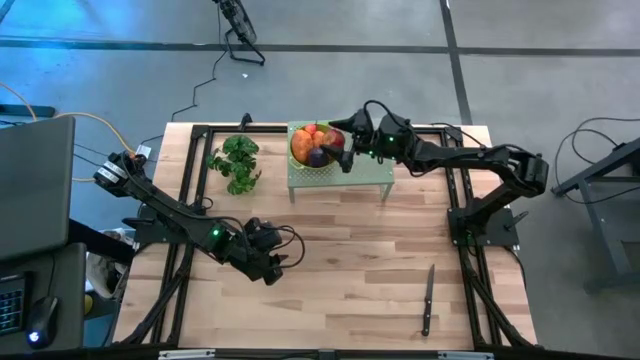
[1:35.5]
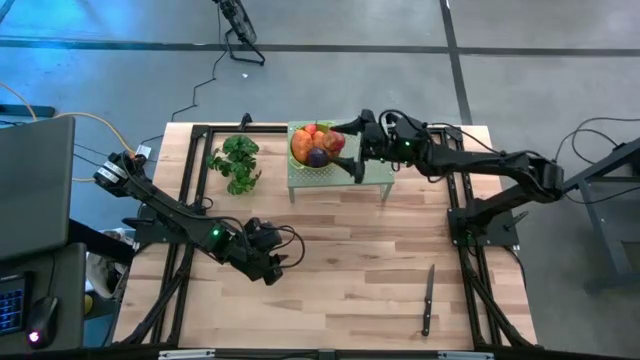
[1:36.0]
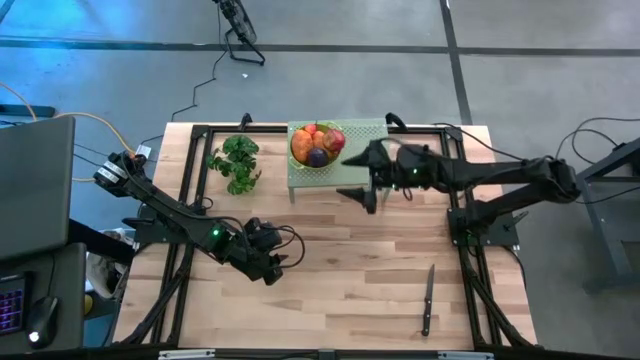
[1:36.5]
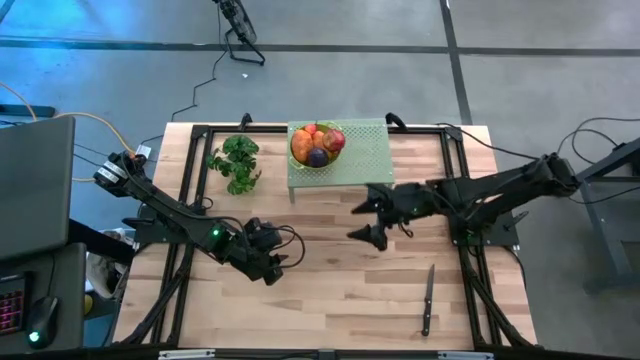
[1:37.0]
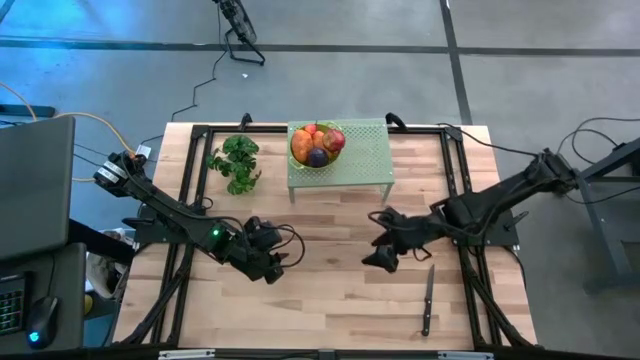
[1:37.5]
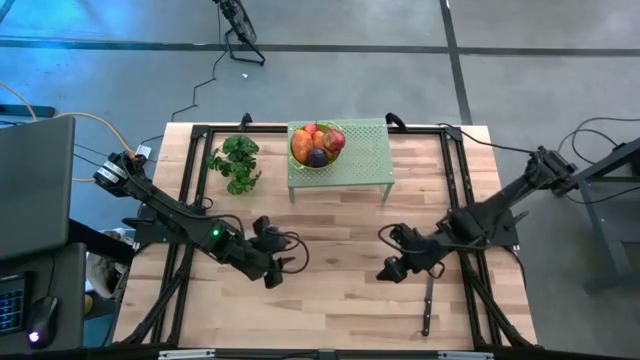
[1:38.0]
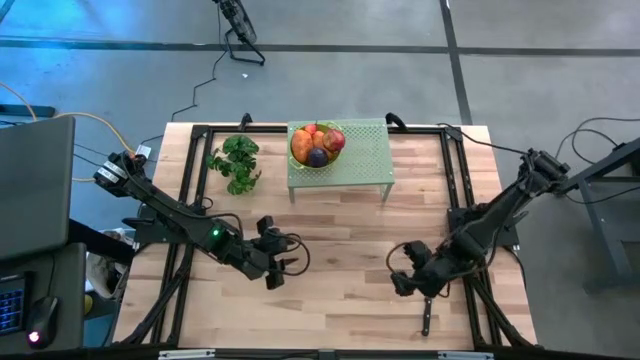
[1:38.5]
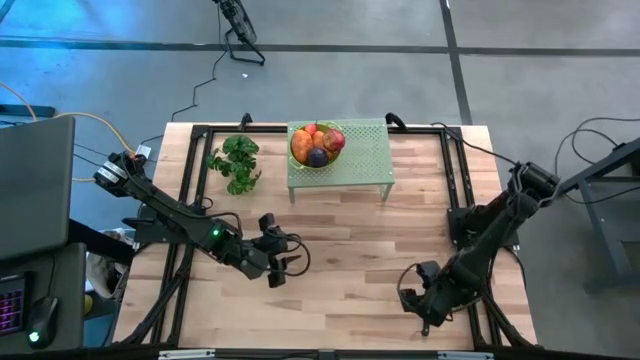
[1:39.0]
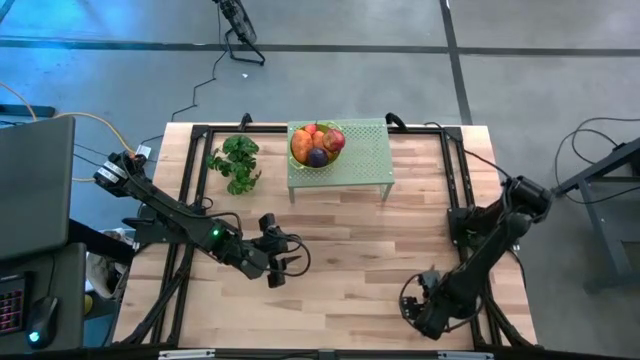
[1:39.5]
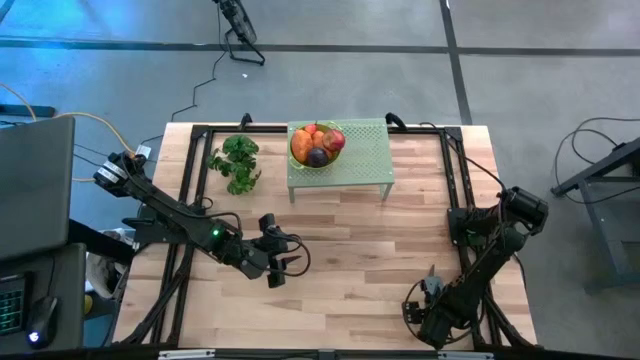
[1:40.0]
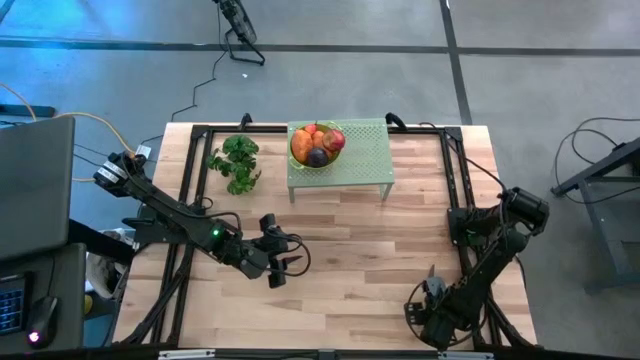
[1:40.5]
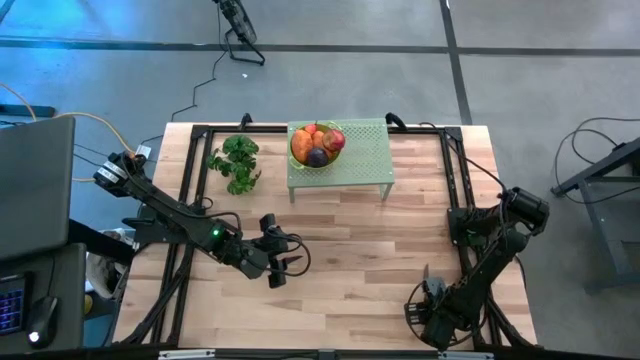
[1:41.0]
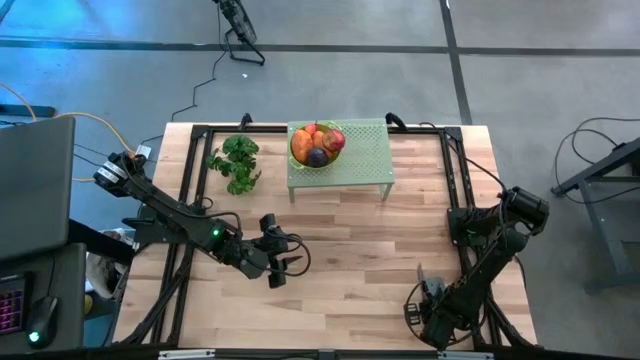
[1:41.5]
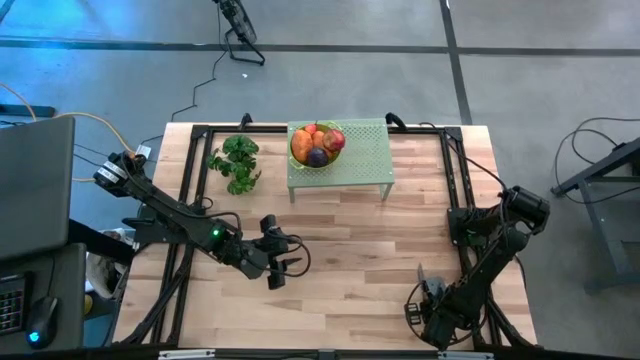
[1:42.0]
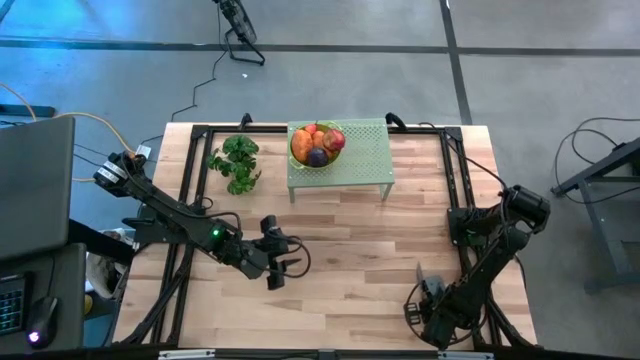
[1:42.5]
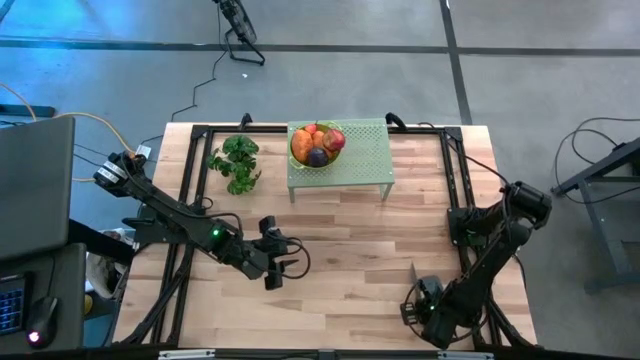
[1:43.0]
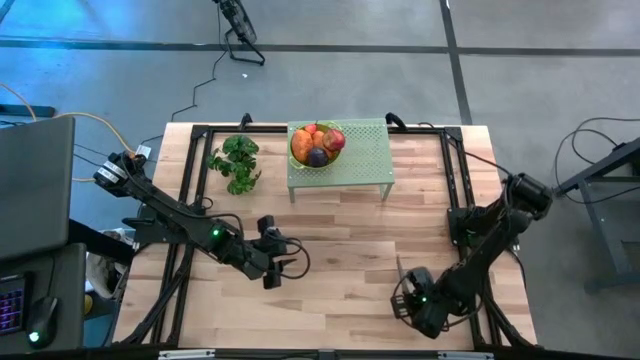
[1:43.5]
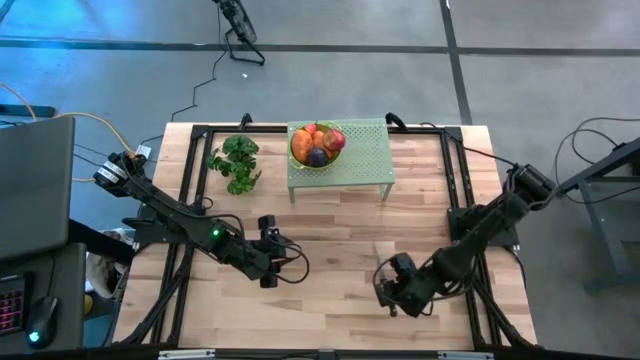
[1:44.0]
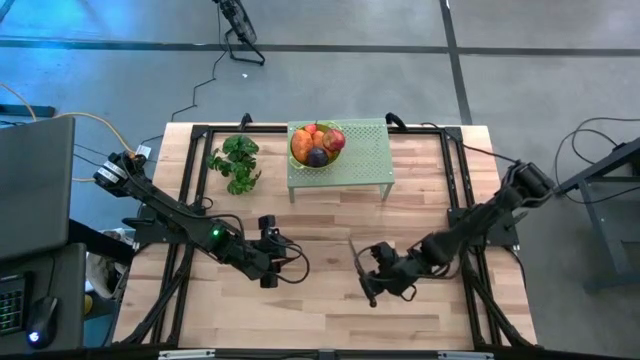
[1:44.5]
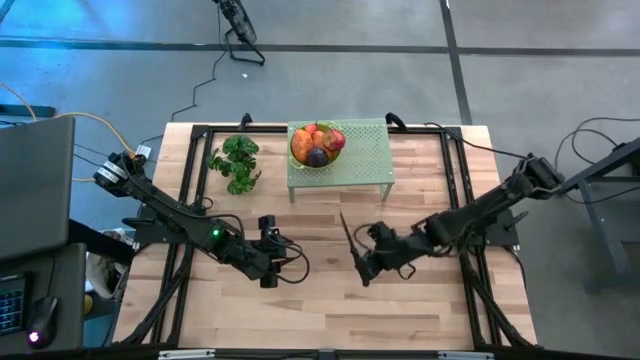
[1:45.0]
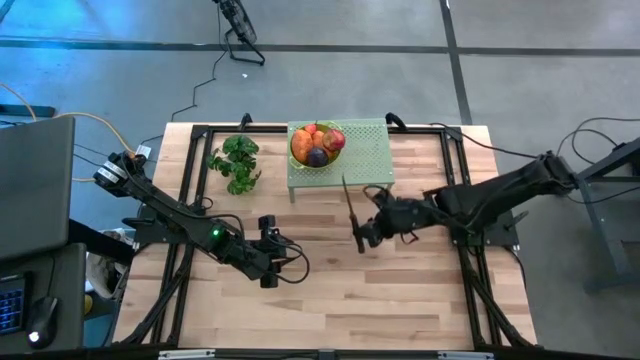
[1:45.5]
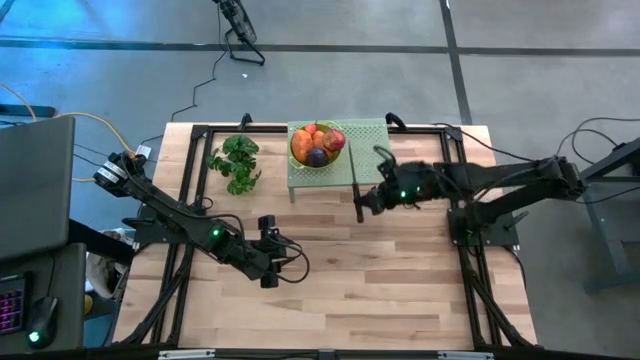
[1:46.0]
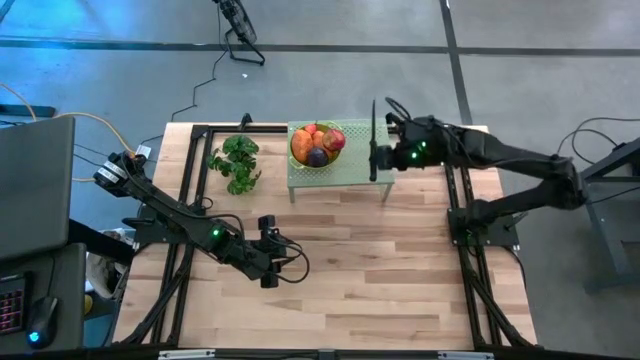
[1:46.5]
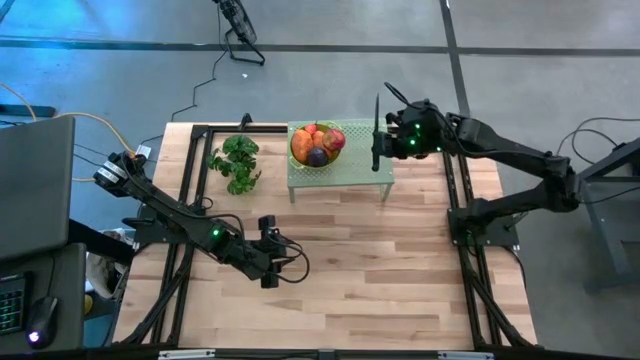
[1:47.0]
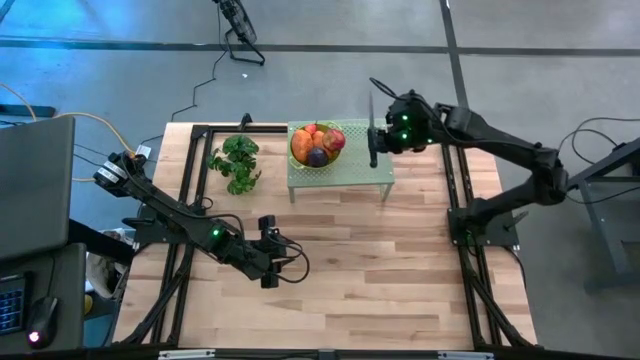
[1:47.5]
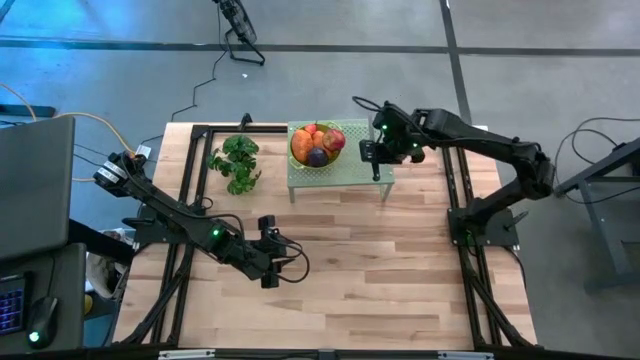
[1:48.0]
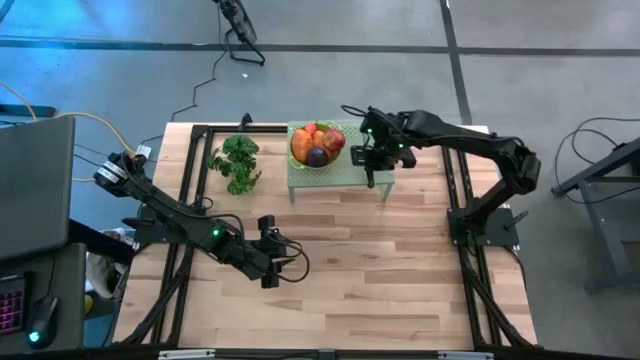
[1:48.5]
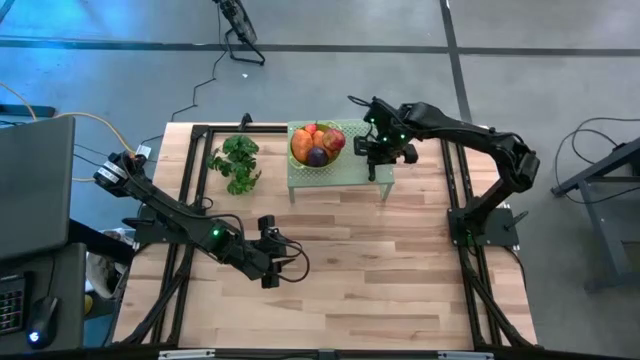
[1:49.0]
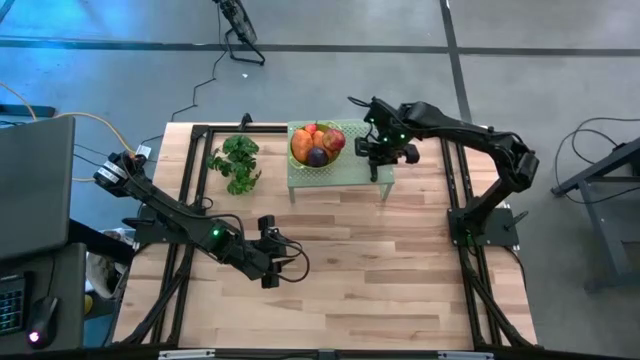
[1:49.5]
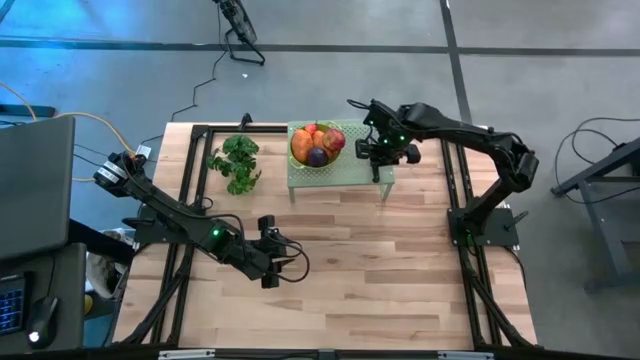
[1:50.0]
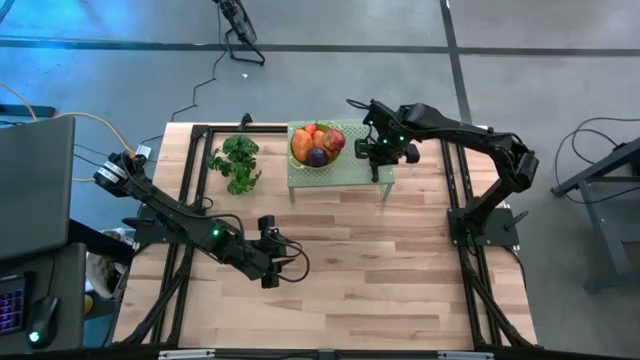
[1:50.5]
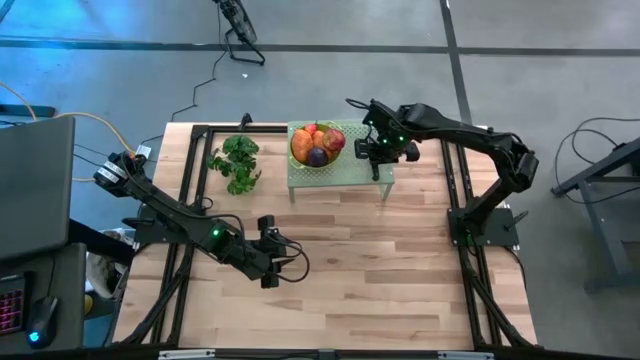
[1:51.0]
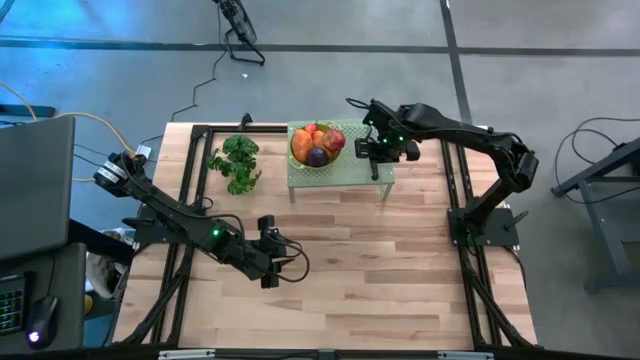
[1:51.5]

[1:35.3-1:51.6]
Task: Pick & Place Fruit
Put the black knife on the shelf

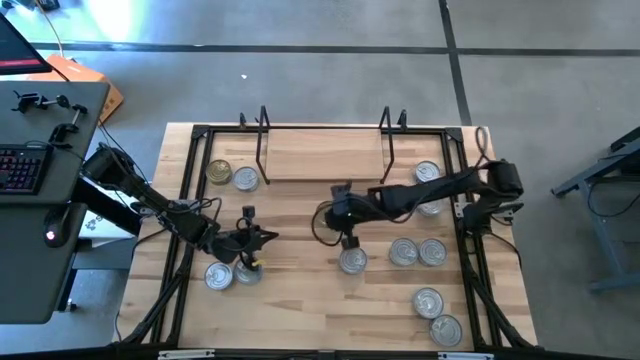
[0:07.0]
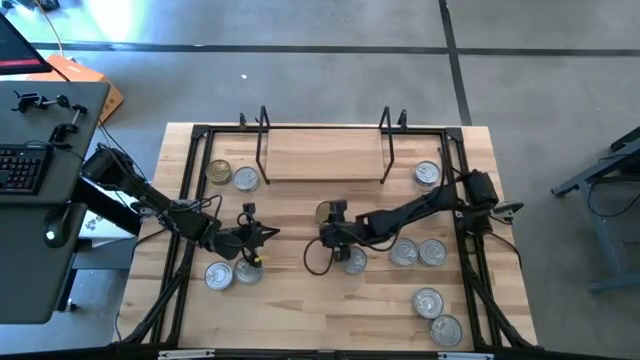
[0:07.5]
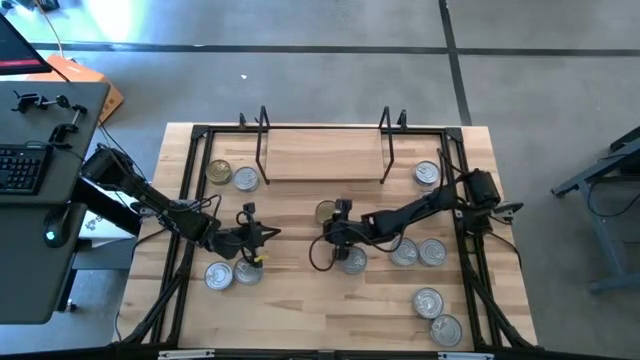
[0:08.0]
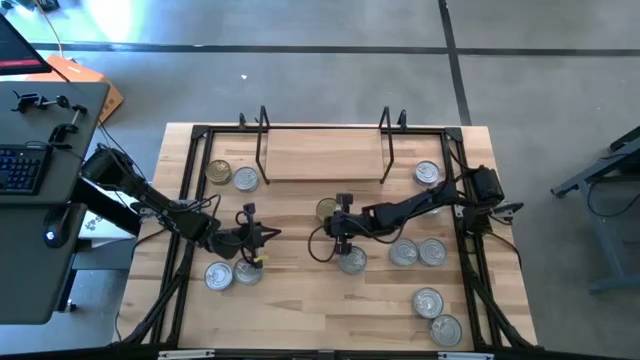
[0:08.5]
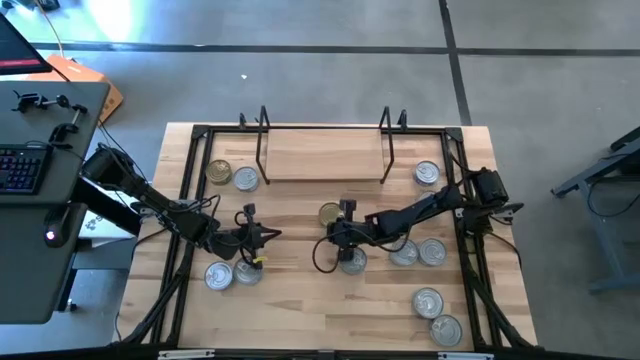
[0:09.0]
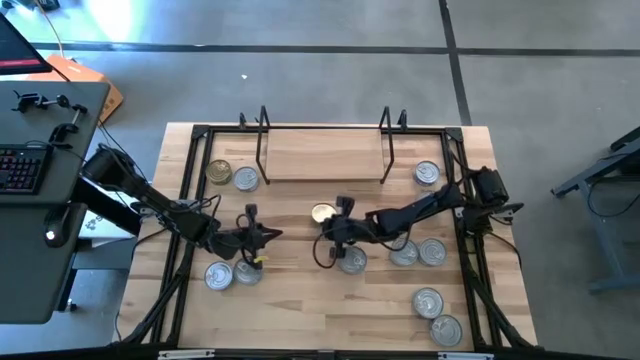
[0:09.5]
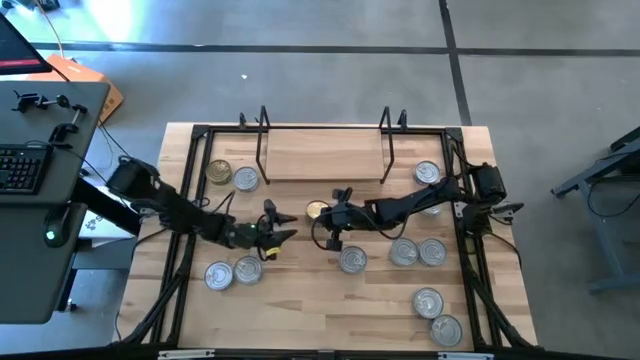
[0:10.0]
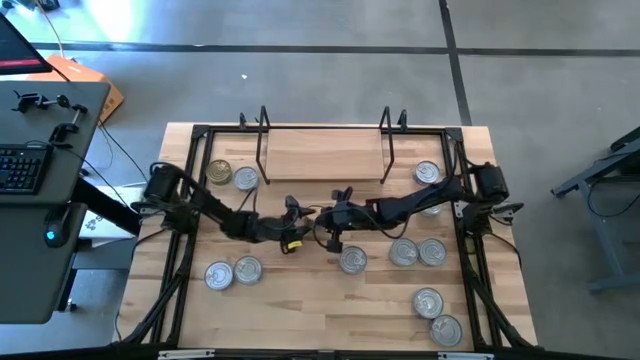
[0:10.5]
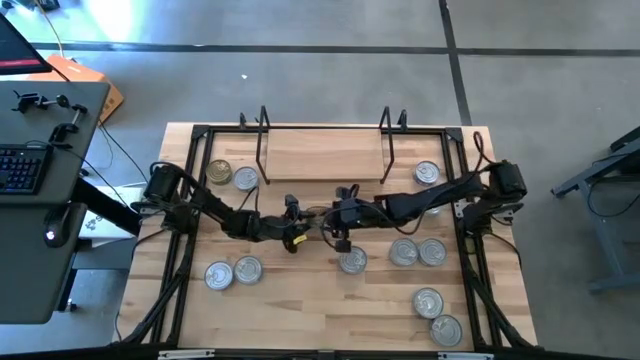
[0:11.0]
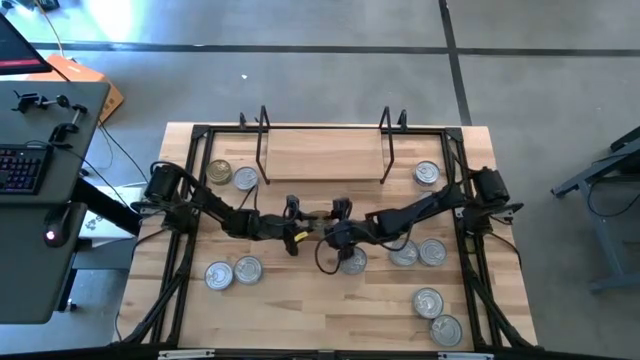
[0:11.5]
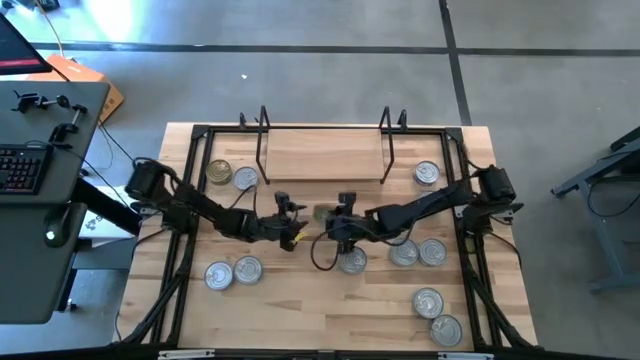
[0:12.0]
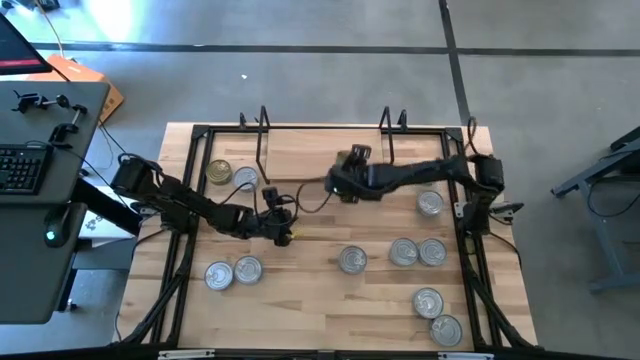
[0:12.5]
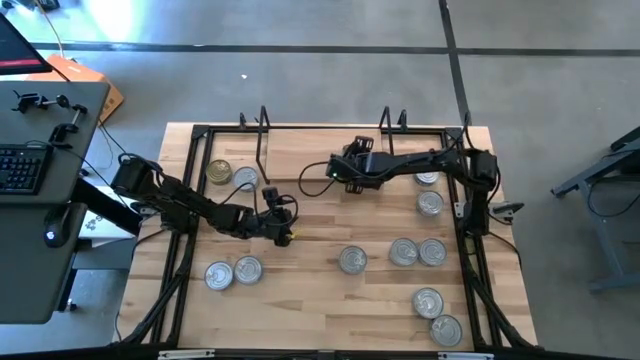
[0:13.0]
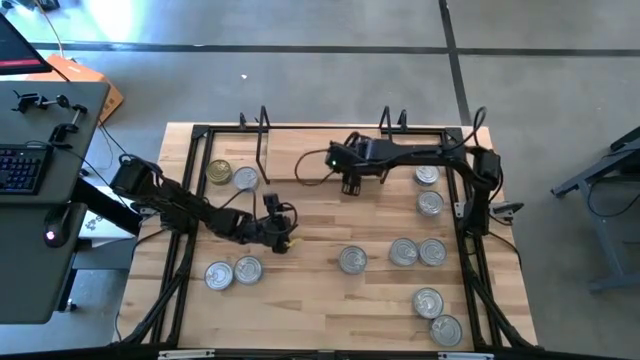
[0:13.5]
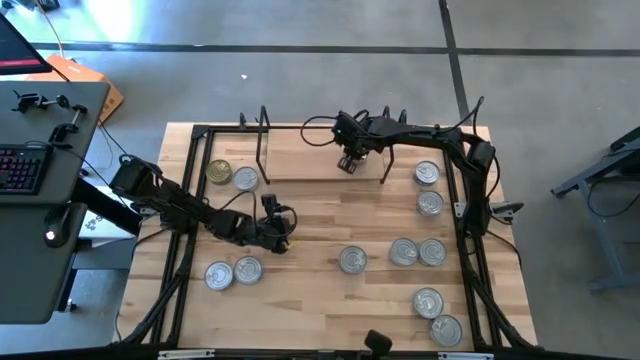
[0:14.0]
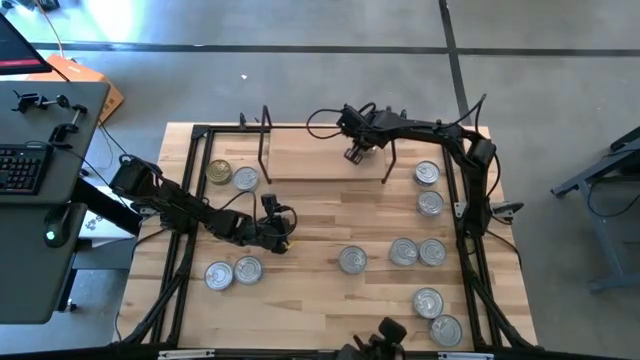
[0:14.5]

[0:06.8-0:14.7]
Task: Stack canned seafood by type on shelf
Put the light green tuna can on the shelf
